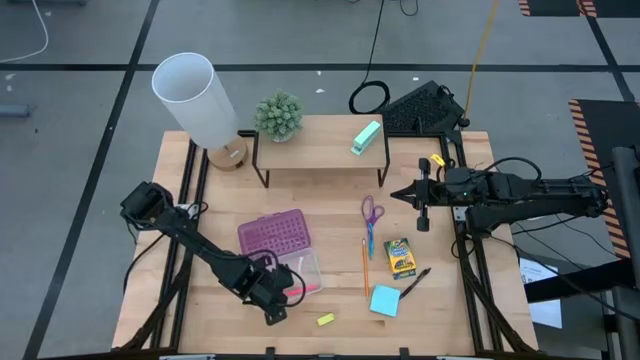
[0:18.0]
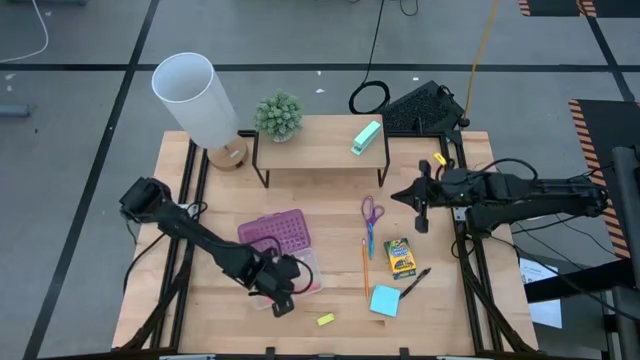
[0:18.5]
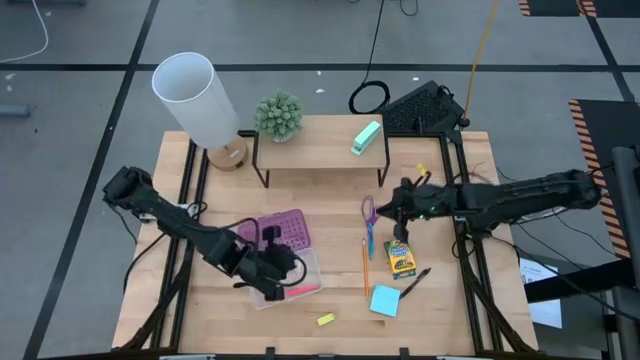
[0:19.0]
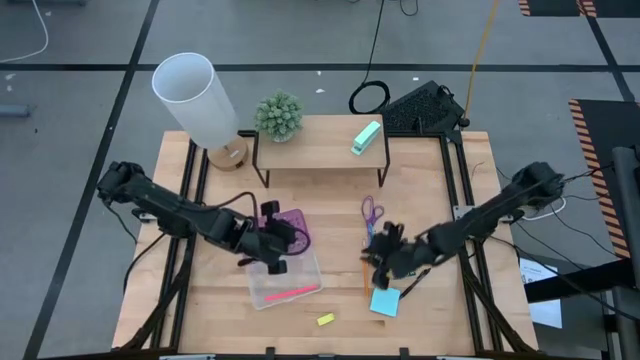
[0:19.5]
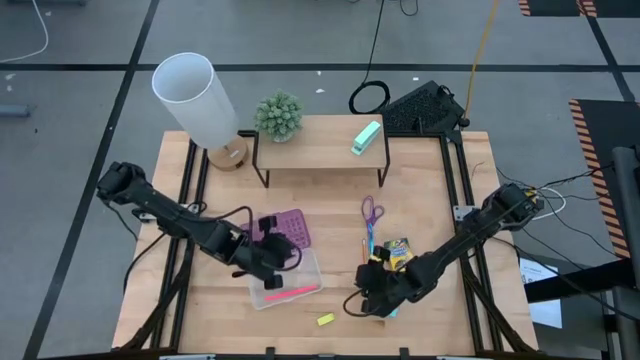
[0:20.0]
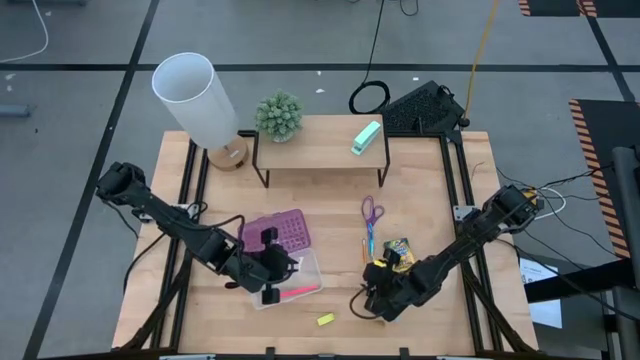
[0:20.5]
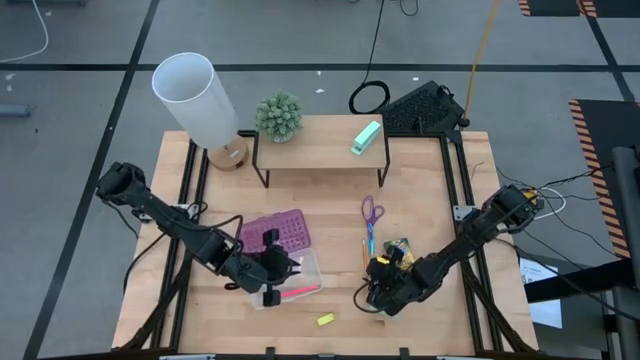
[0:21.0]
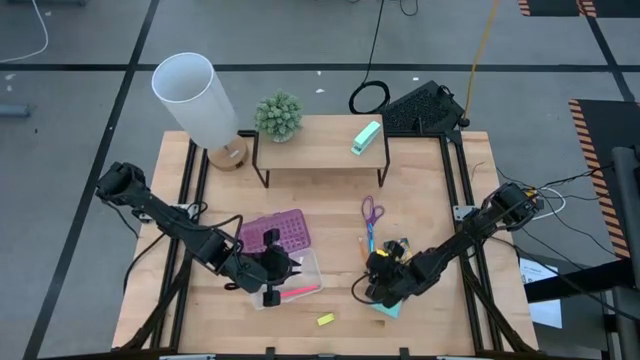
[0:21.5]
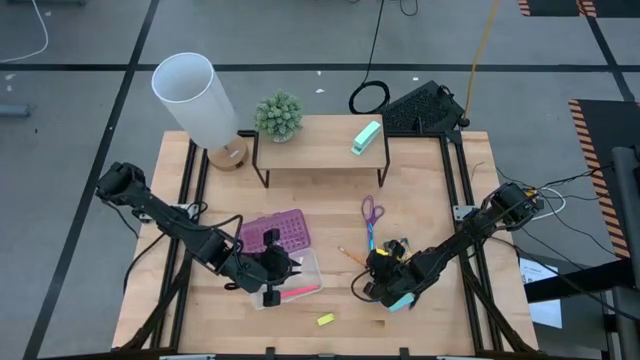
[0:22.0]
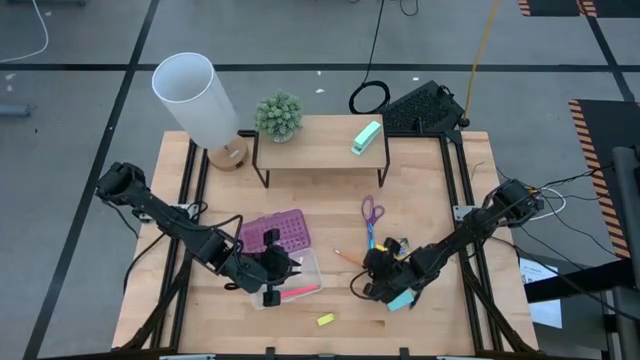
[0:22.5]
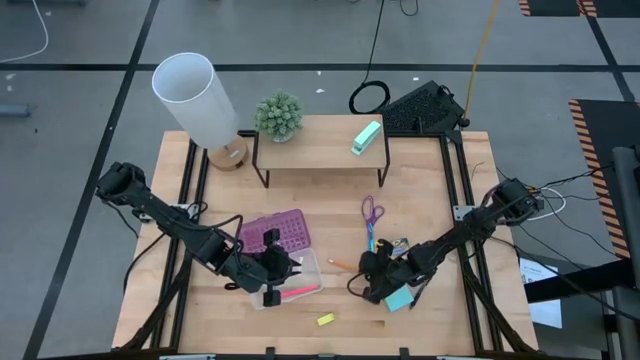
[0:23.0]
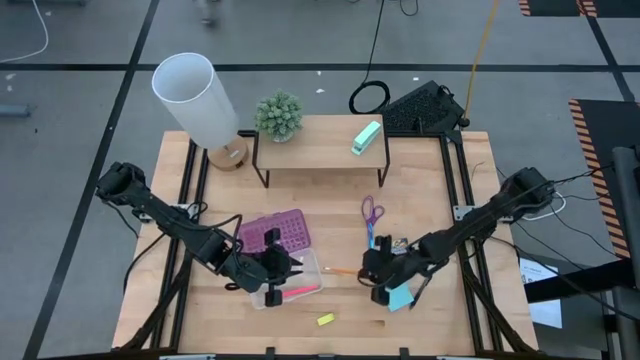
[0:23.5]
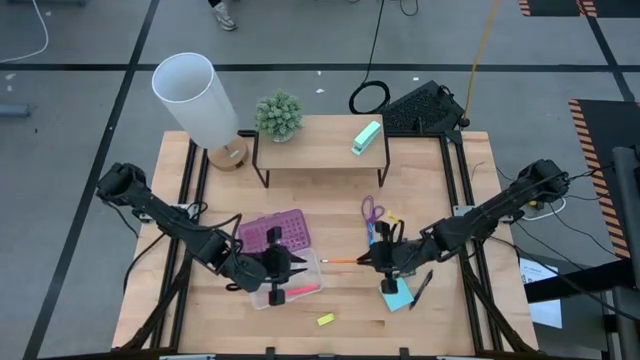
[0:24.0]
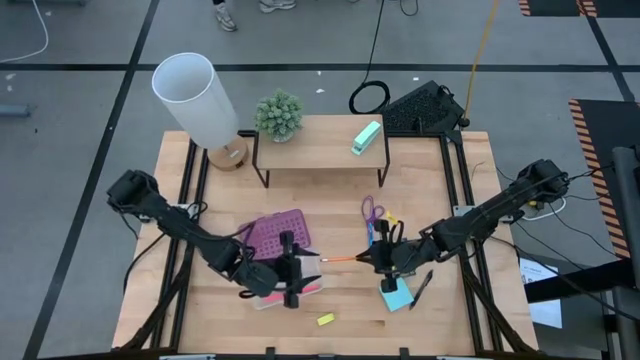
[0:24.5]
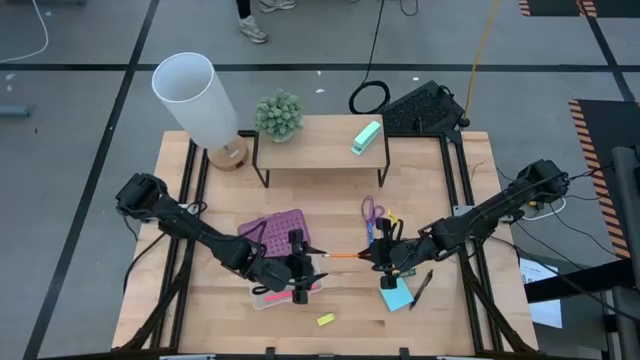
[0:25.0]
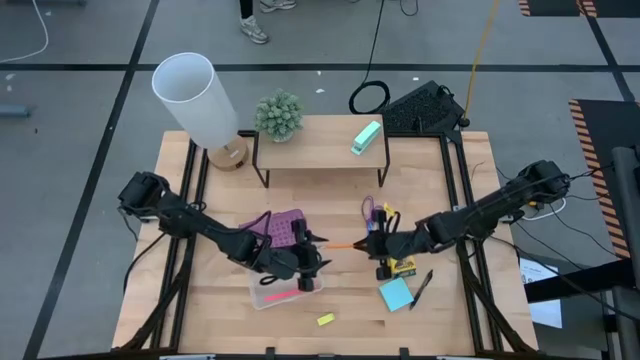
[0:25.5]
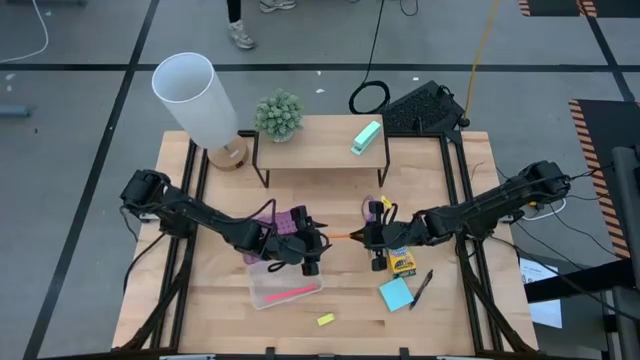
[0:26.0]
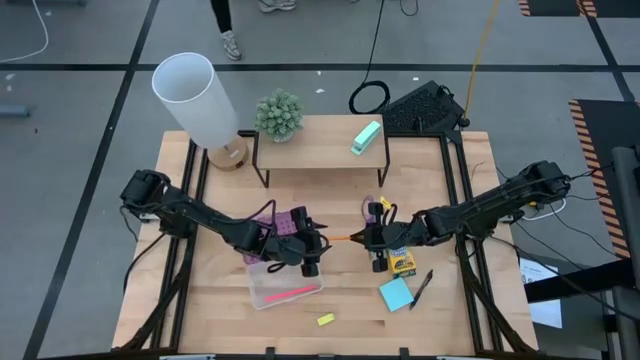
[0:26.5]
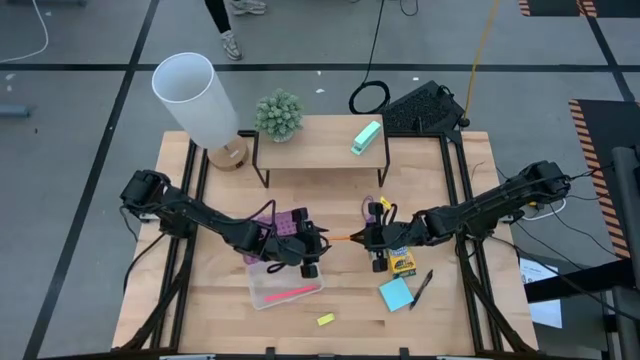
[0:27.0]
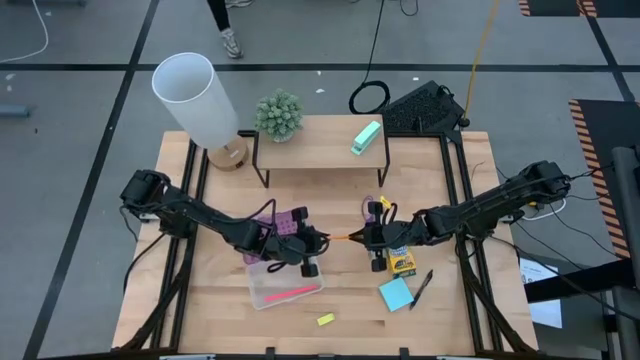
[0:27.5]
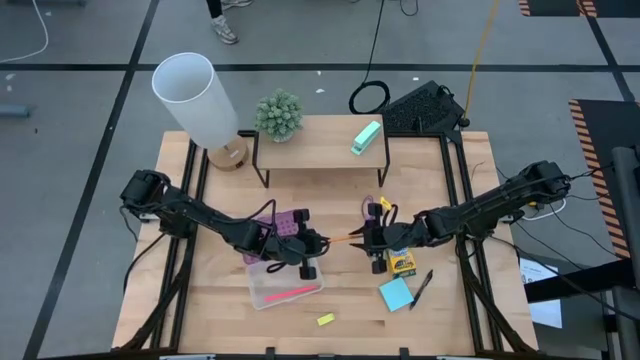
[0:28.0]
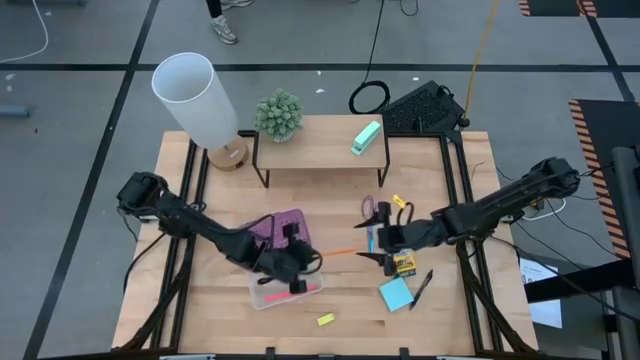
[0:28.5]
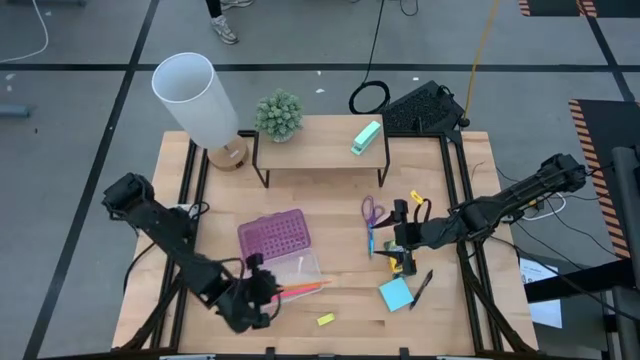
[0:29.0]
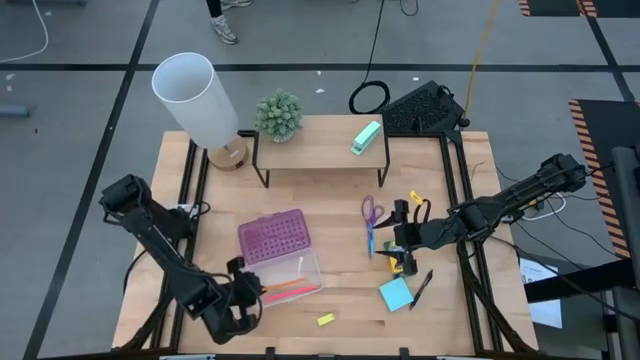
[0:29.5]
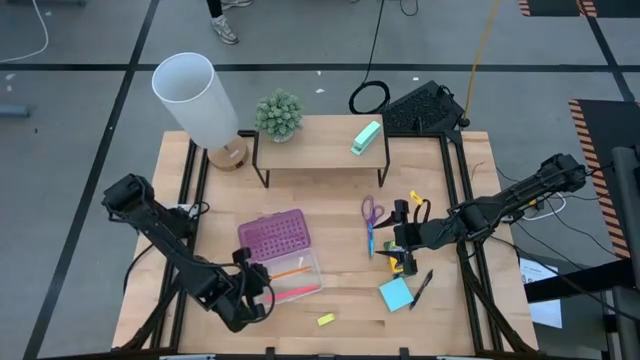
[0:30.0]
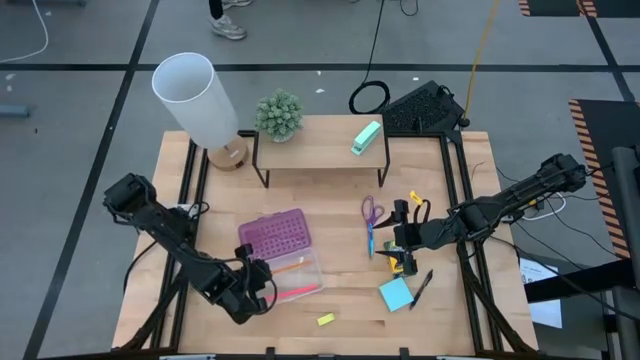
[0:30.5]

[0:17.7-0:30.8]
Task: Pack school essentials
Put the orange pencil into the transparent box

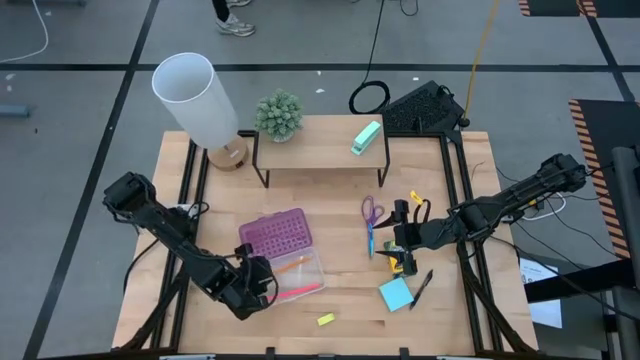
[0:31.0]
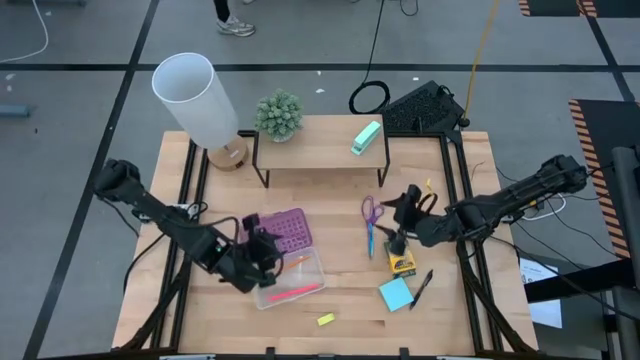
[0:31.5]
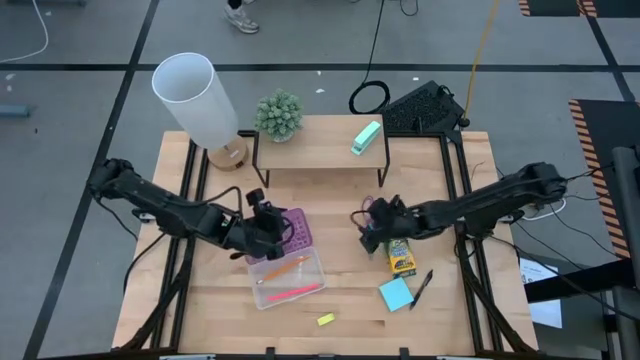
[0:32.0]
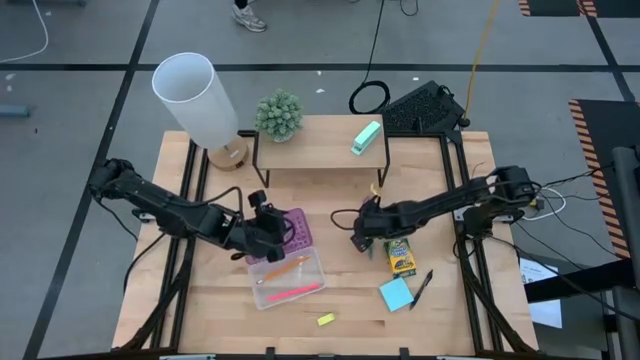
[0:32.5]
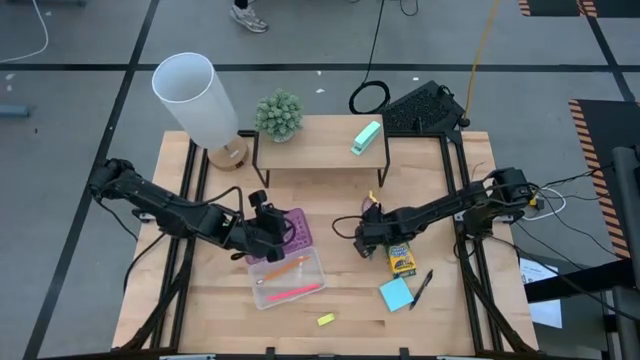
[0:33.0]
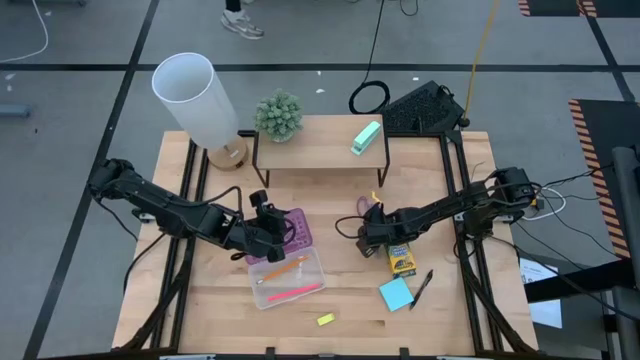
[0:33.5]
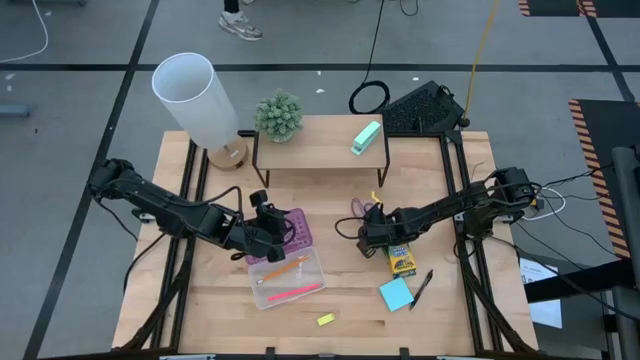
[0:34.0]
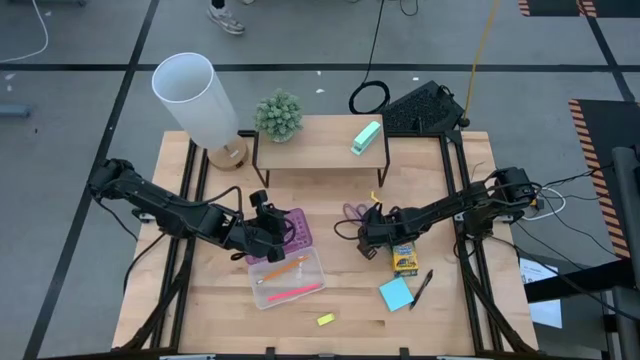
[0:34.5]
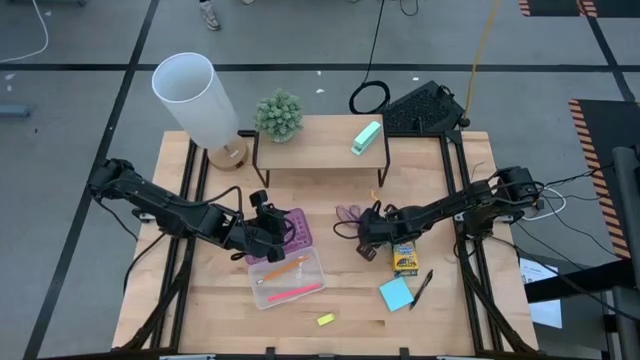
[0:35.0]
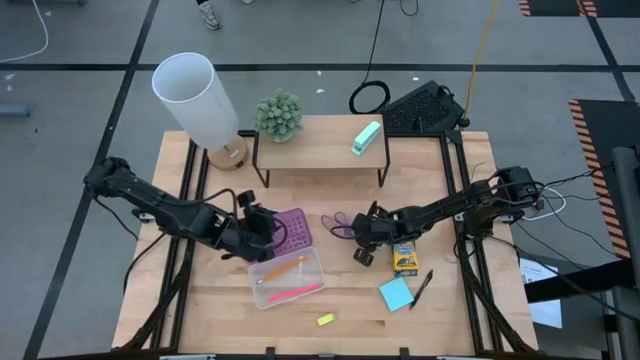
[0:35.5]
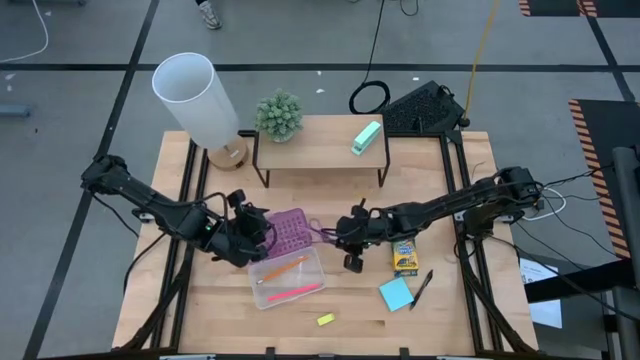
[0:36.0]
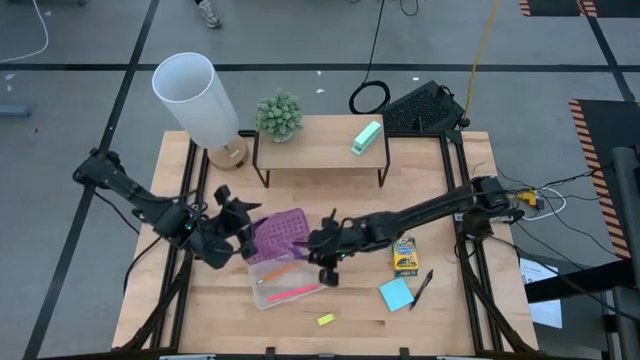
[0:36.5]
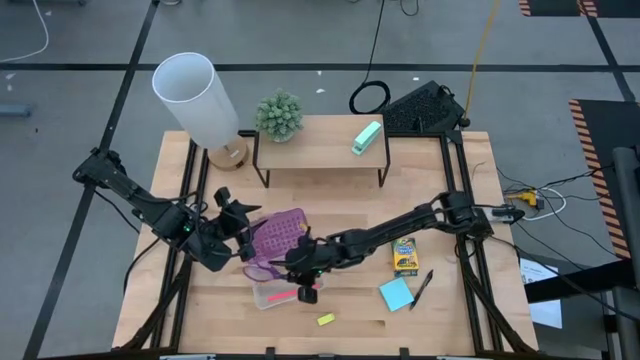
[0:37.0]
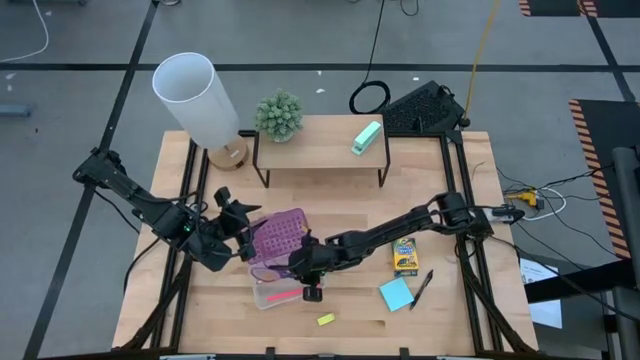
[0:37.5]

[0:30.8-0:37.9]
Put the purple scissors into the transparent box

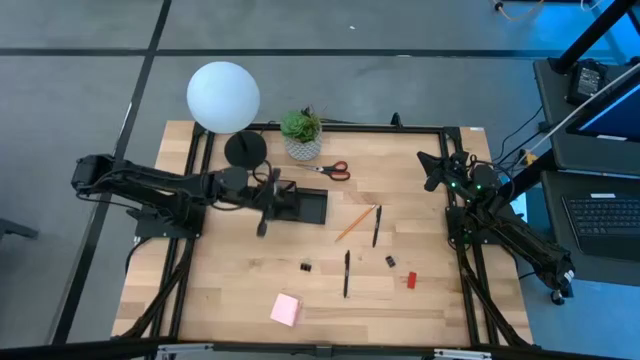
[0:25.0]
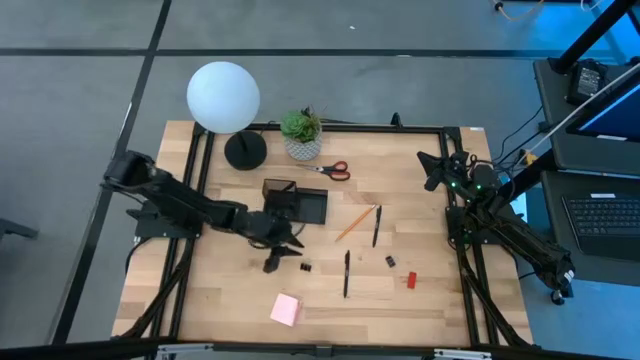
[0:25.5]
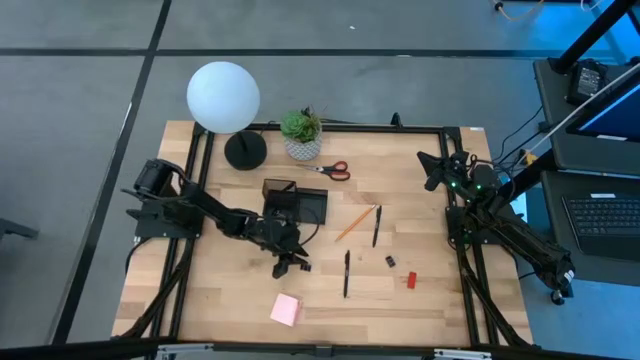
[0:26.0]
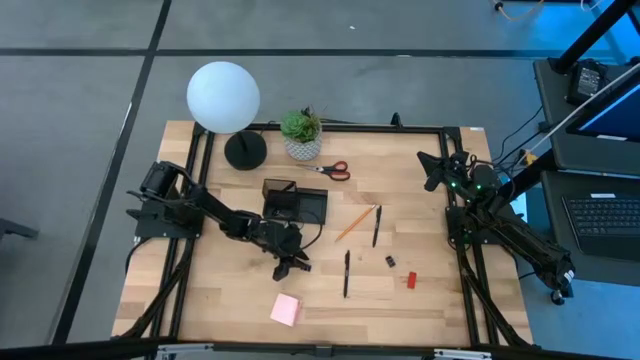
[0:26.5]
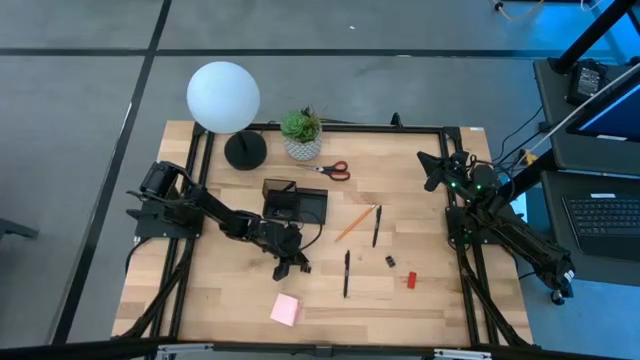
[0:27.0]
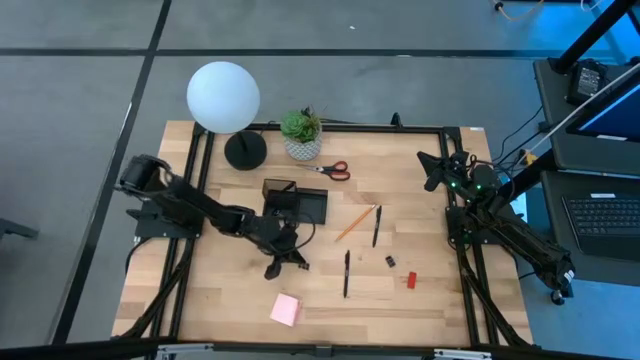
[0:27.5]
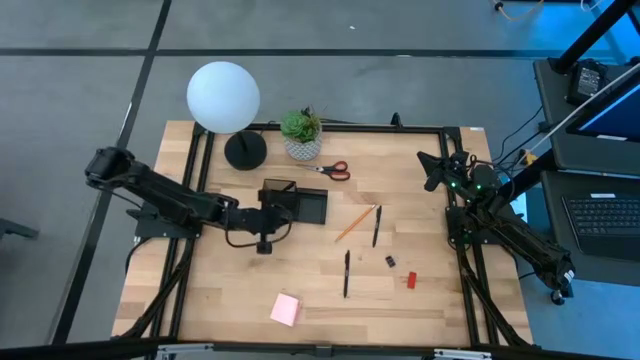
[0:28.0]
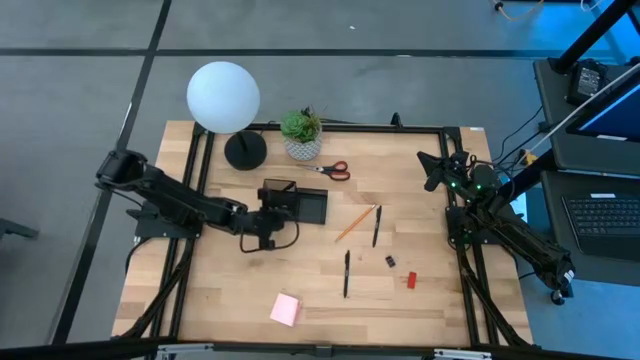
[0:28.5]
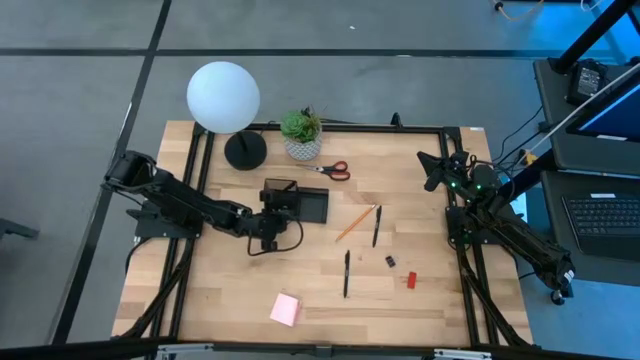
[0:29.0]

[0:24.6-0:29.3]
Task: Pick and place office supplies into organizer
Put the black binder clip into the black desk organizer
